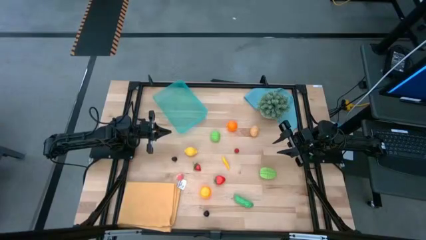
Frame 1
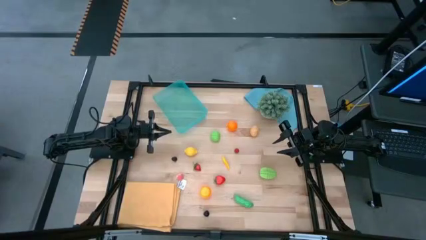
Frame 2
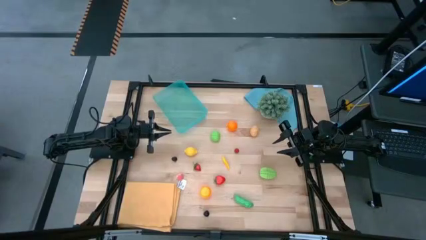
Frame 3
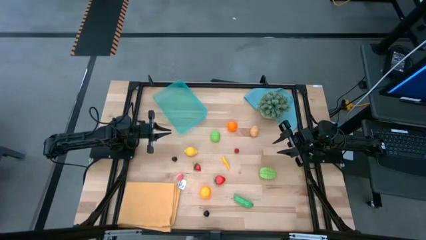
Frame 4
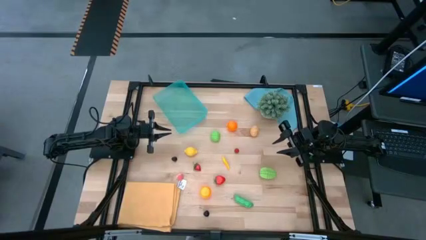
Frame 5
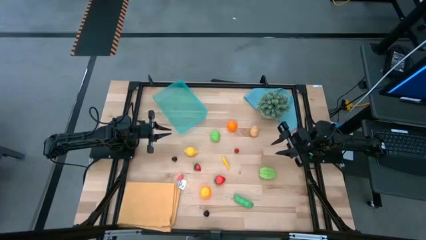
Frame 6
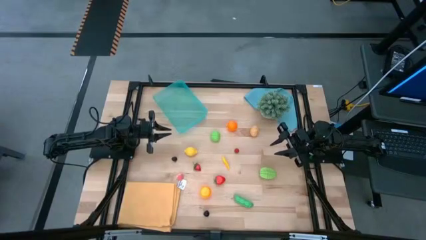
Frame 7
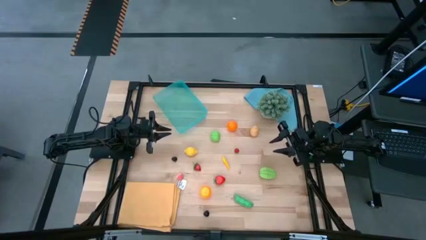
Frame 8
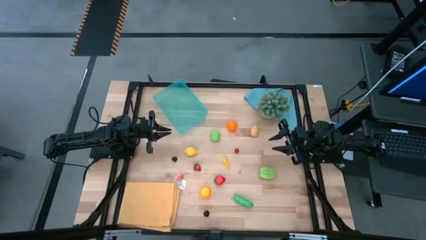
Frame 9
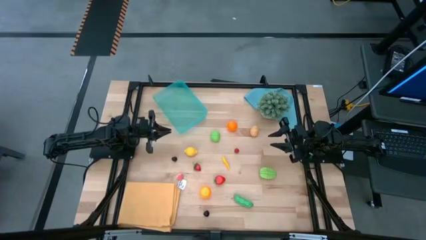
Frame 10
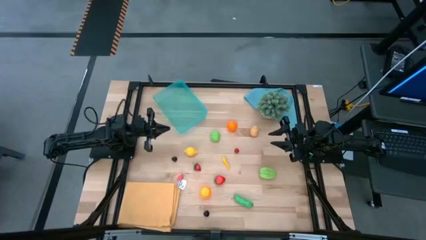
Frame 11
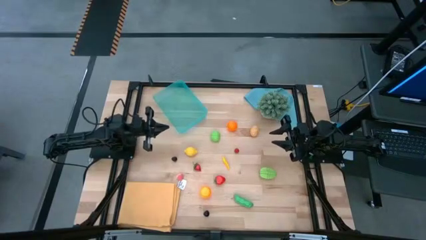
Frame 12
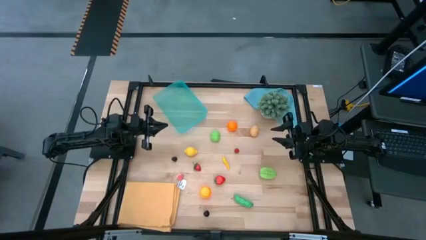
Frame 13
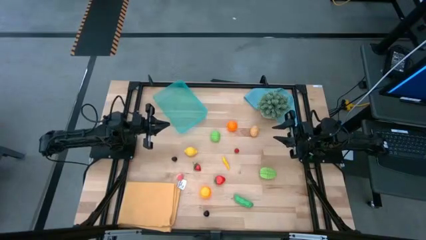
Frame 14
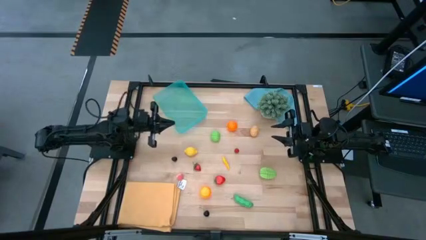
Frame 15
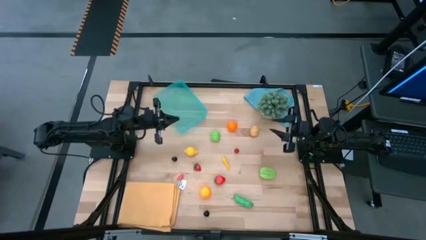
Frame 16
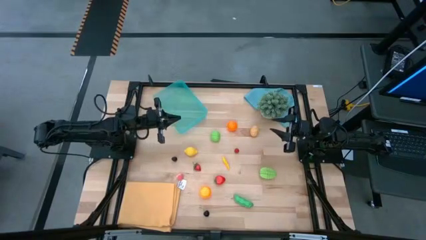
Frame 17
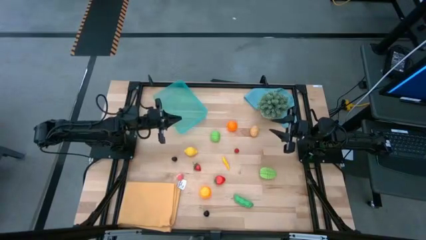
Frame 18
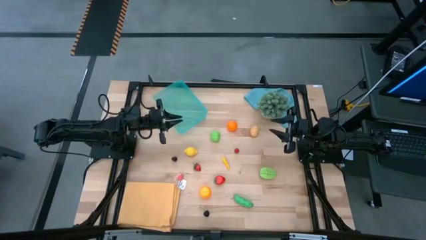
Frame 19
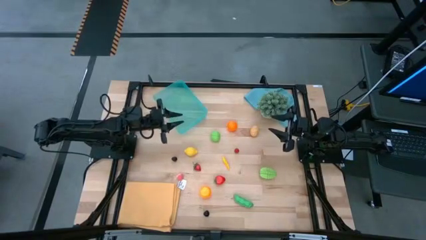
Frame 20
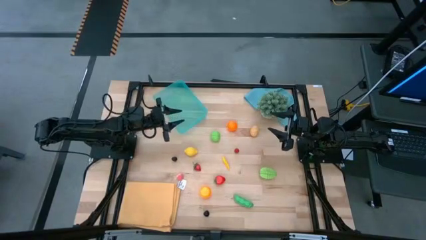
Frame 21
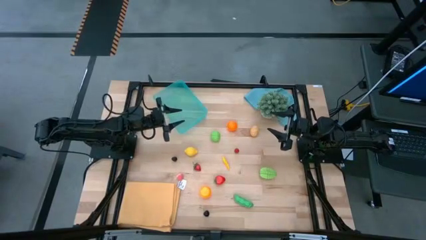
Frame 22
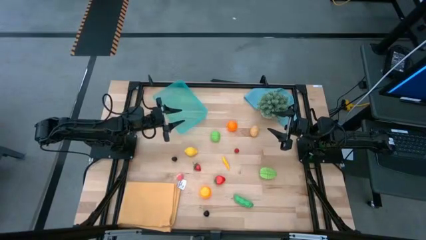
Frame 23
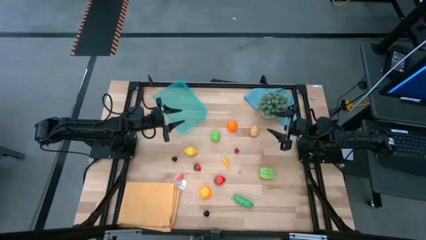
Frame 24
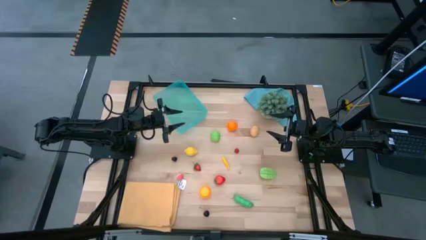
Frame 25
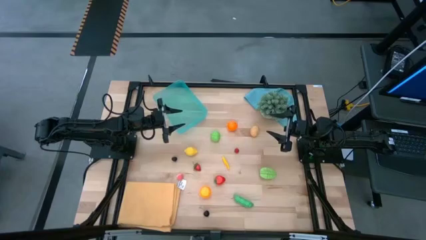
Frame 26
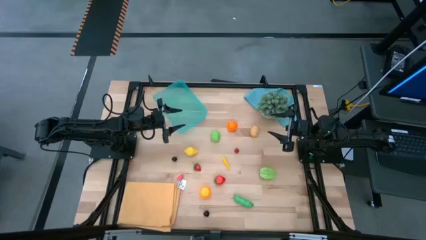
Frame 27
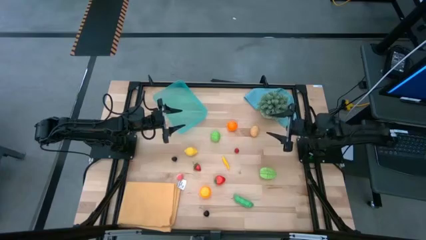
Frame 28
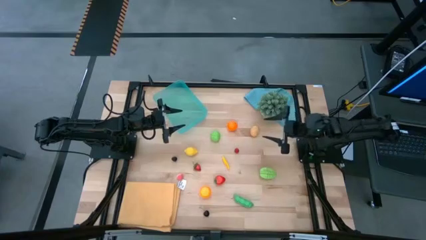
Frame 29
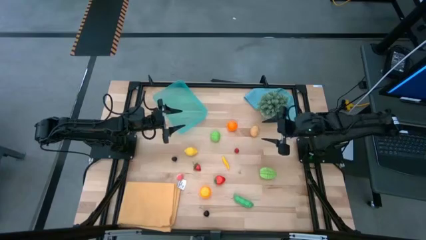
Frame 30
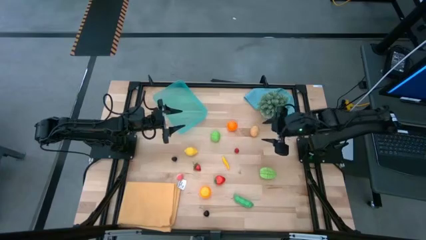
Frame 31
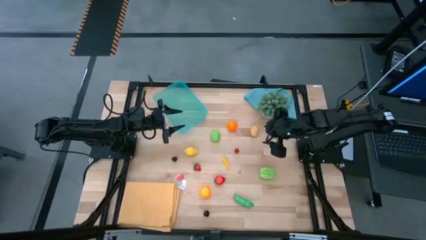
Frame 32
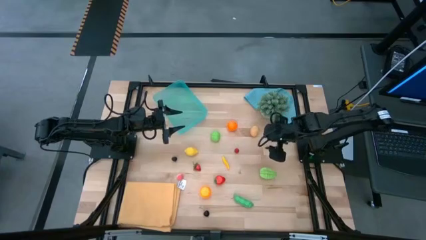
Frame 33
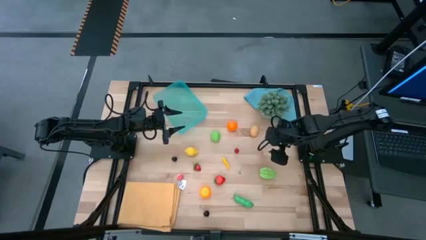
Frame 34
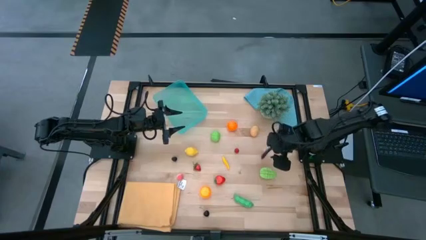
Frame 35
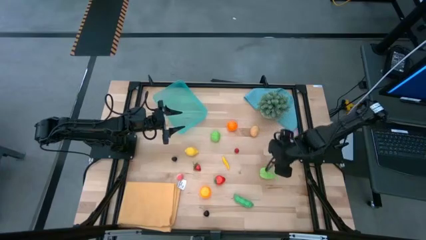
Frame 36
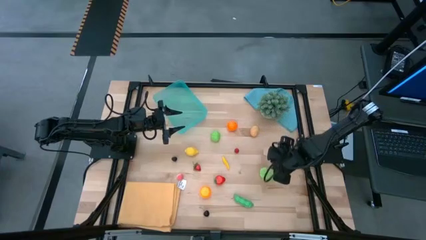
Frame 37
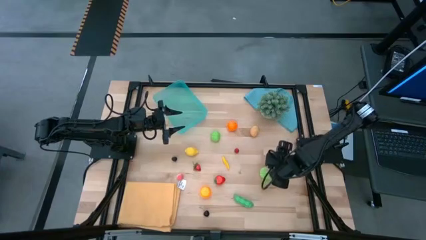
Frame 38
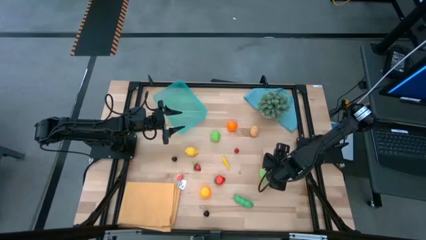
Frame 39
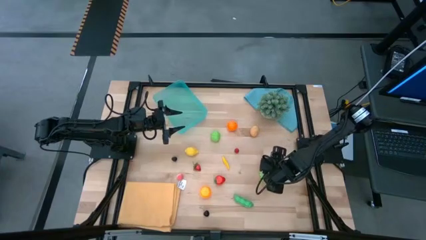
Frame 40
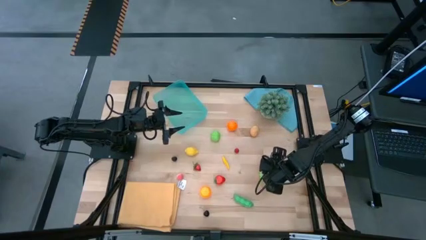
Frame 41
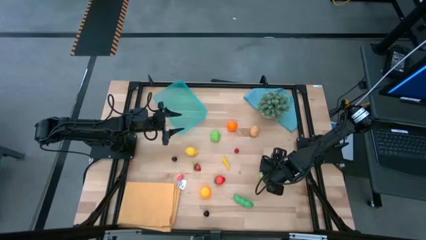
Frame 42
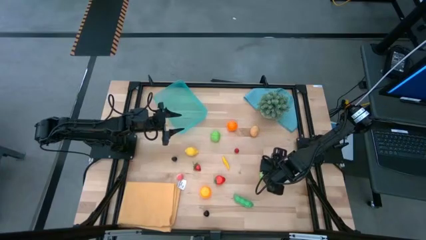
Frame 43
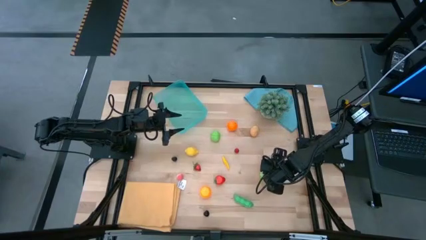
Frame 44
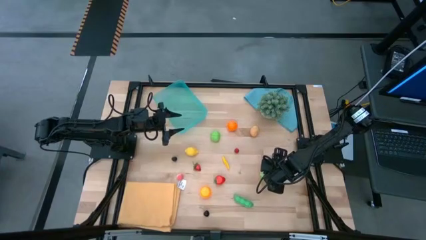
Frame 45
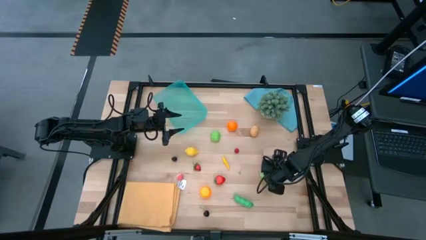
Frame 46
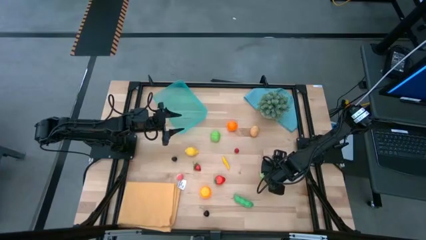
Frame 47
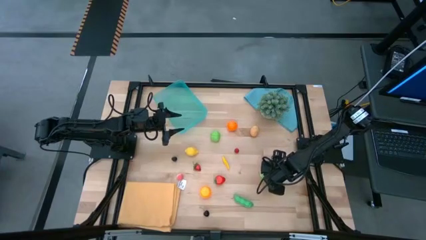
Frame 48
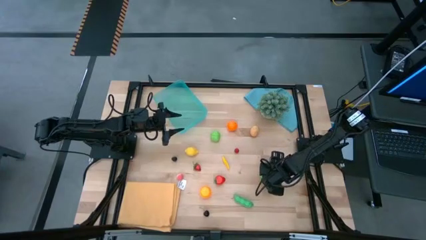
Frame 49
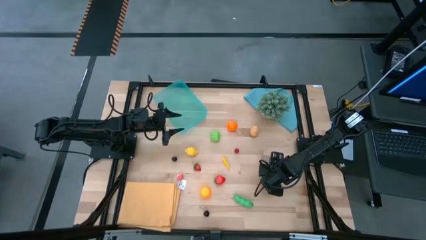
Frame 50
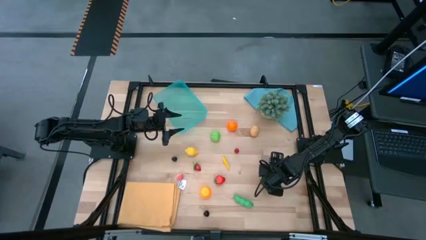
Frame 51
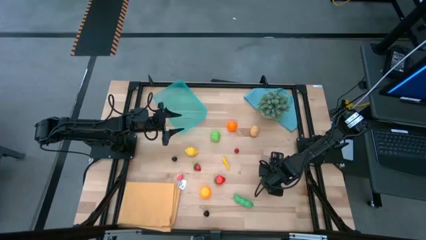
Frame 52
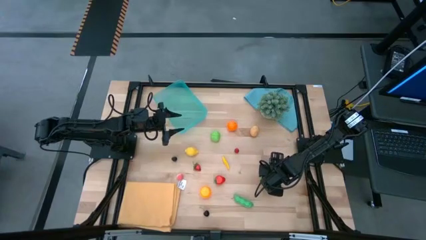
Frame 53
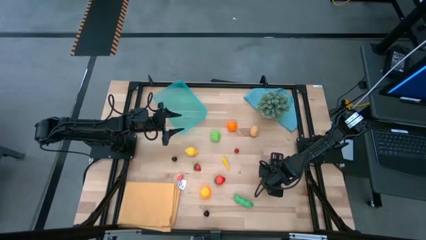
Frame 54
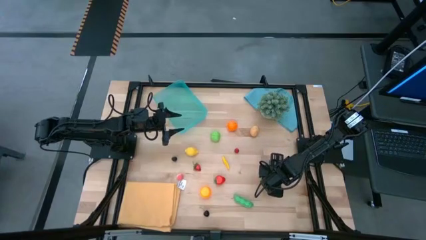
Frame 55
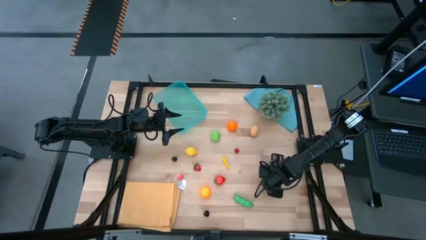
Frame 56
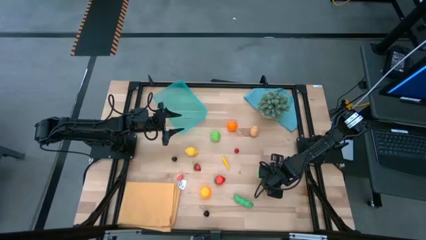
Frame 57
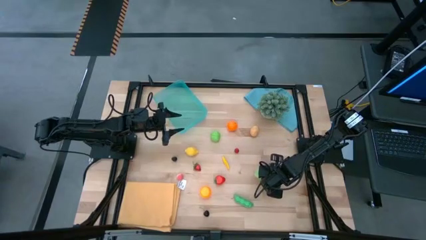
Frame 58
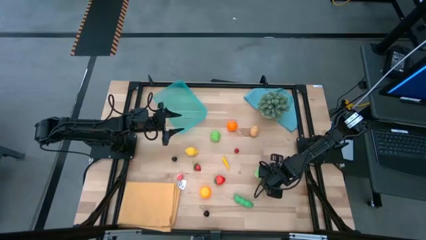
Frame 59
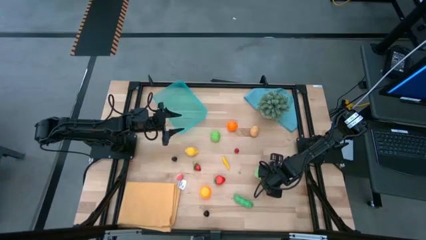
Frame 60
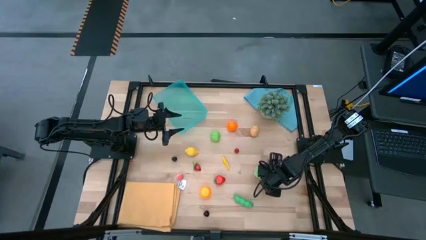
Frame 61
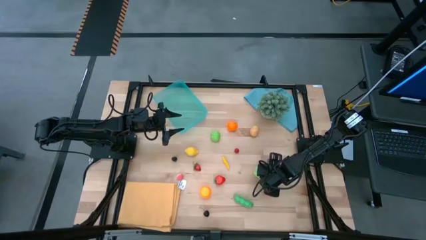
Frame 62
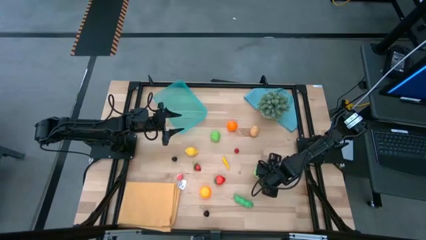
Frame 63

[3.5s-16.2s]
Task: Pick and placing Produce into tupperware
Put the green starfruit into the blue bin
